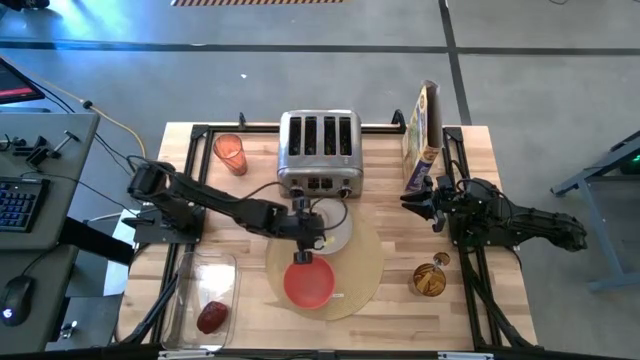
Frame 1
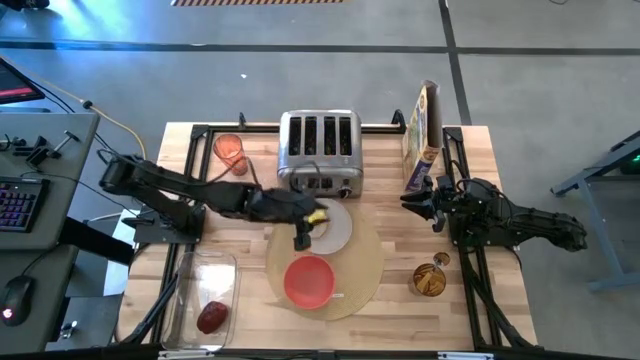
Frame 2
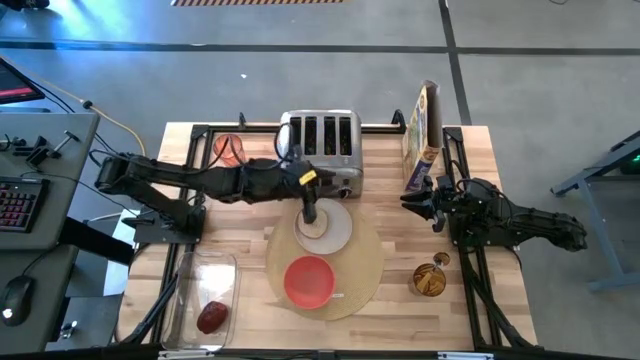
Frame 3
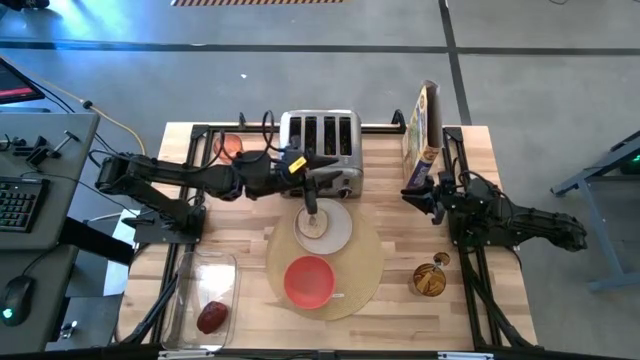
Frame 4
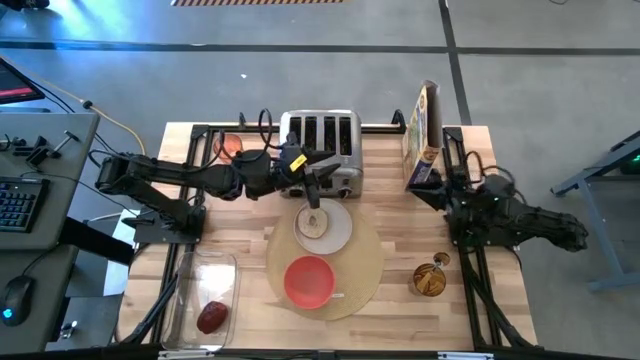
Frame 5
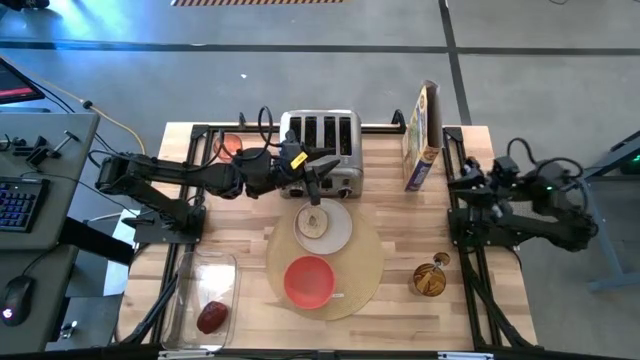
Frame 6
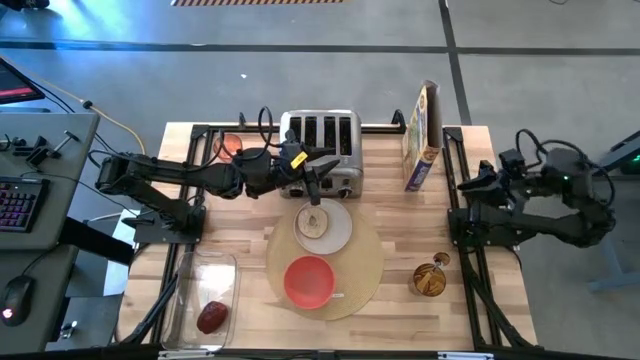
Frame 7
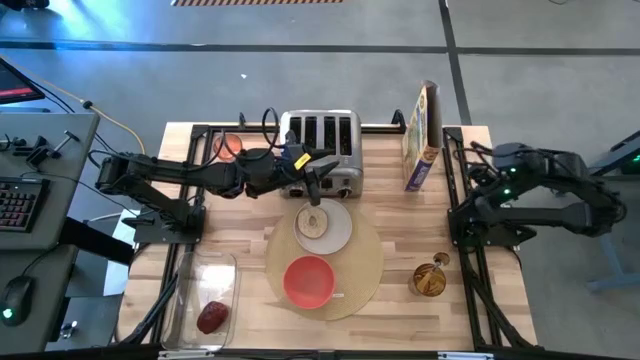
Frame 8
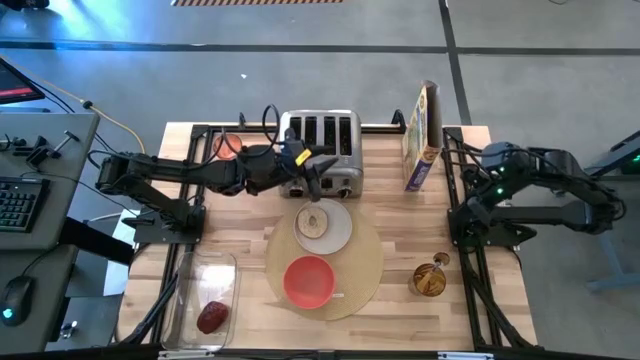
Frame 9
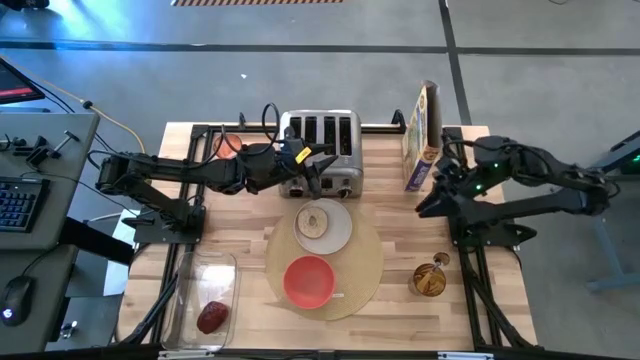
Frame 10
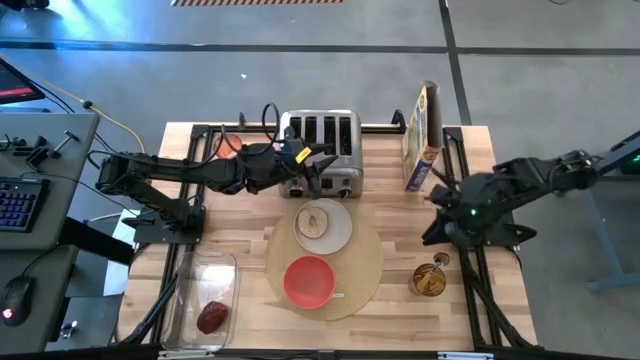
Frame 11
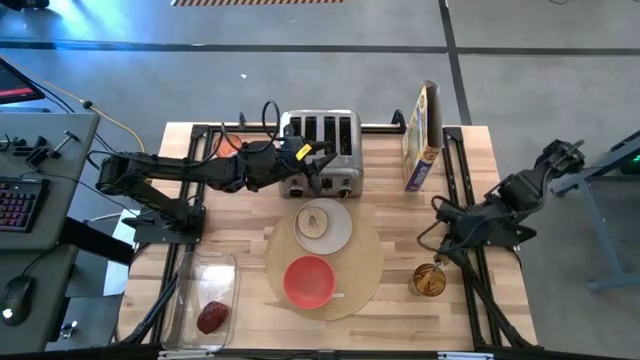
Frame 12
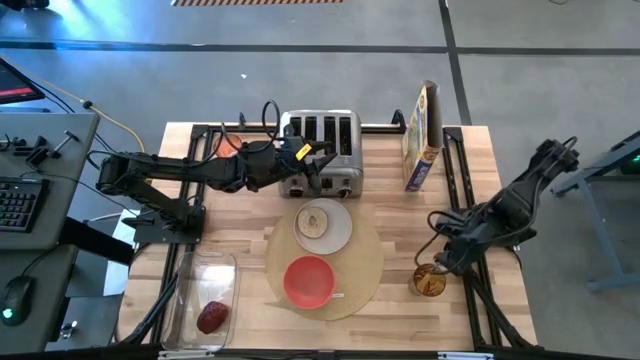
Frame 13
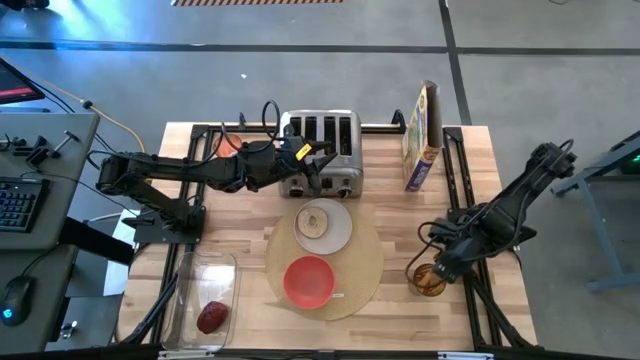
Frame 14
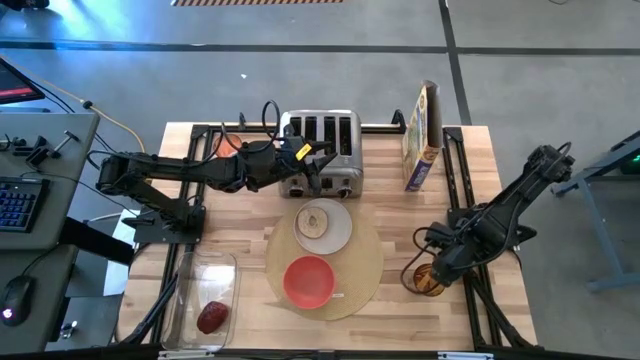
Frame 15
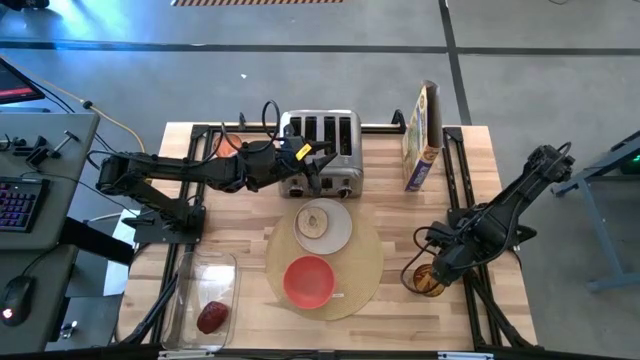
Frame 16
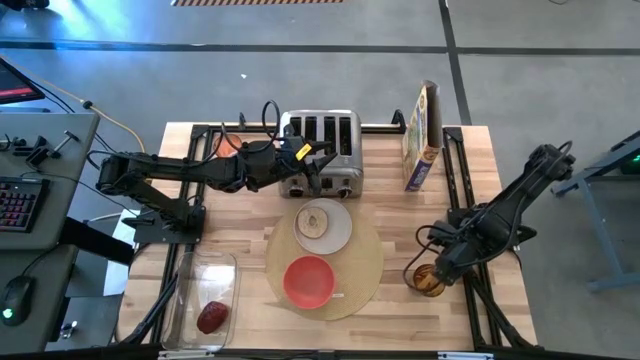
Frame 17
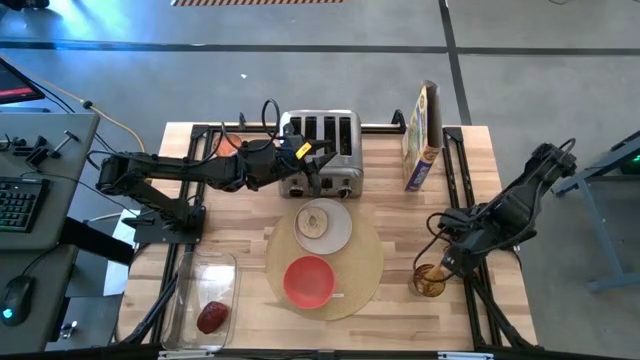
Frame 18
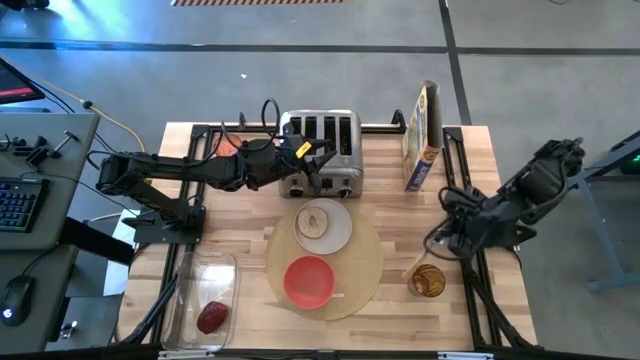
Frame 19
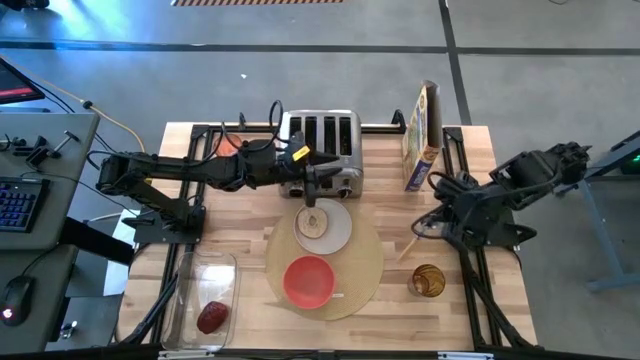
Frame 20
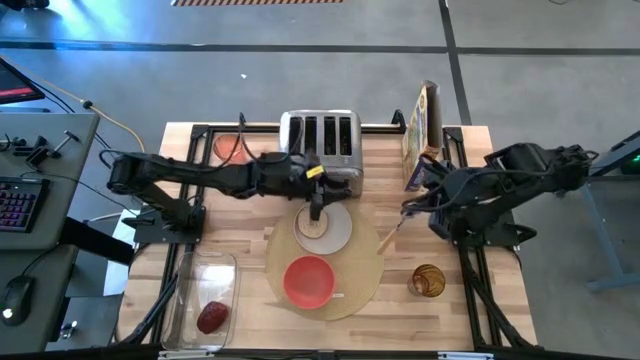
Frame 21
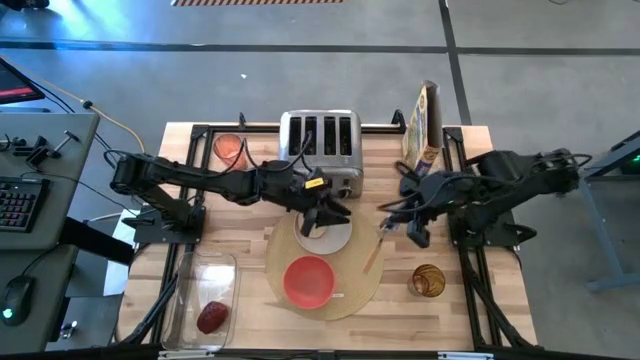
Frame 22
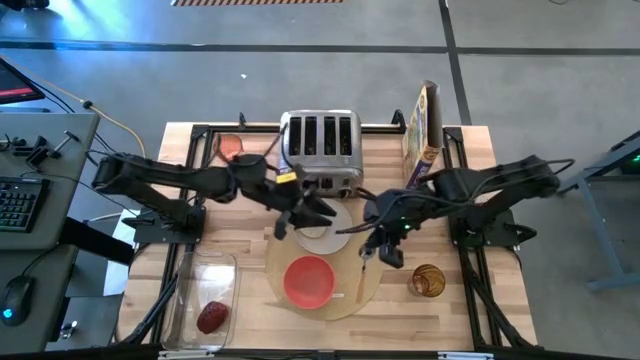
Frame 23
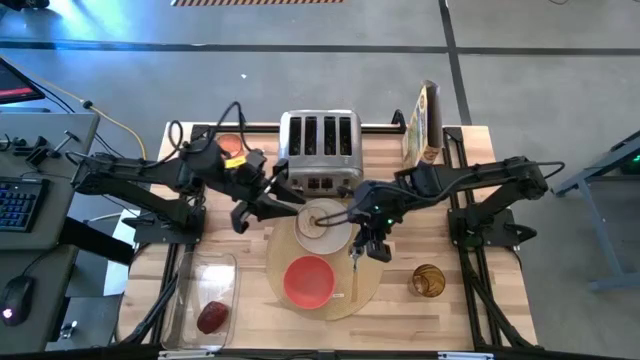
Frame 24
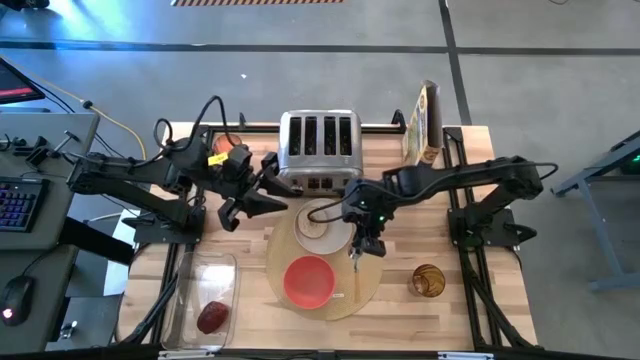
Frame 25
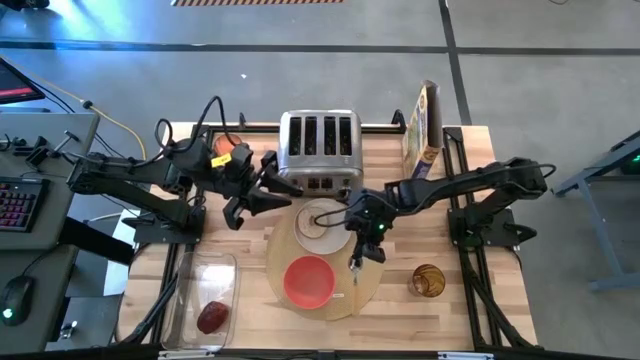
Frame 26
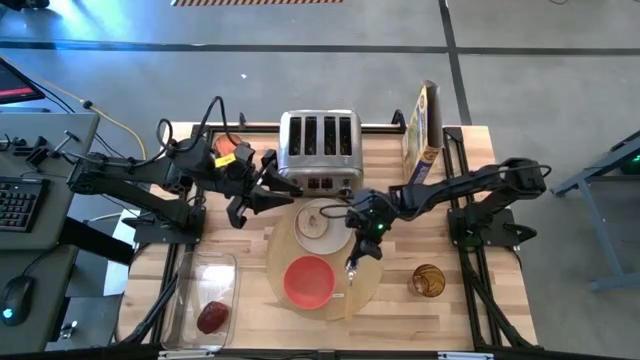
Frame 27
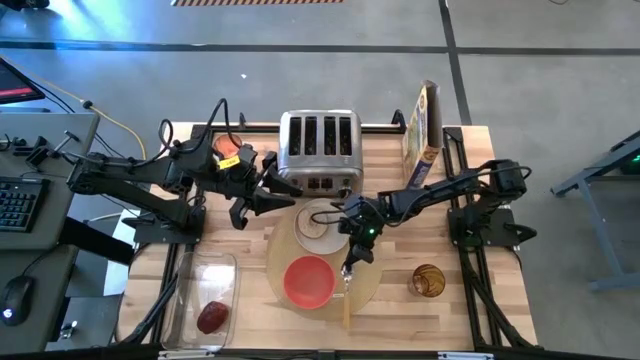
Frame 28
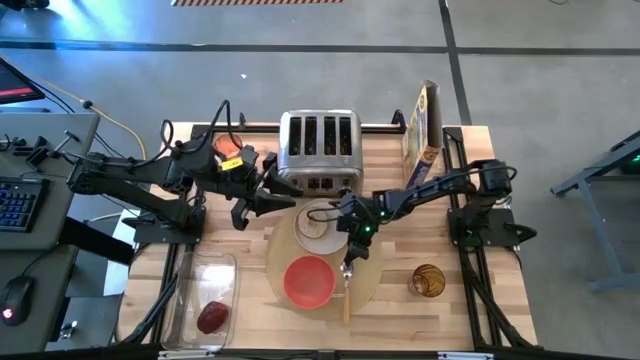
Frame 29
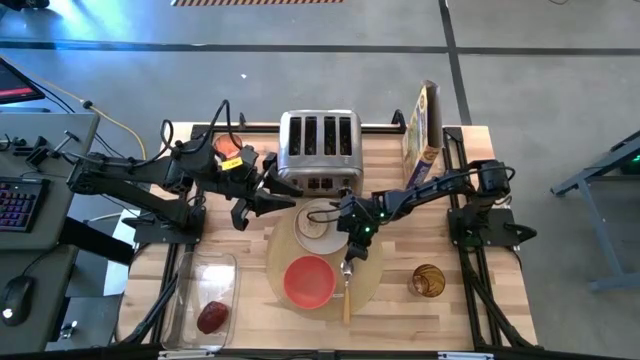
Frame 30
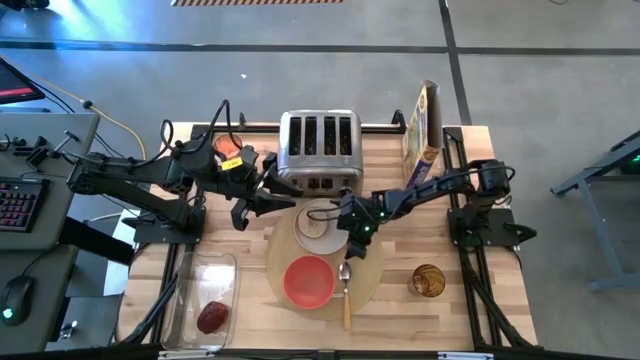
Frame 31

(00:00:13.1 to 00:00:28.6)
Task: Arrange a breakfast setting
Put the spoon on the placemat

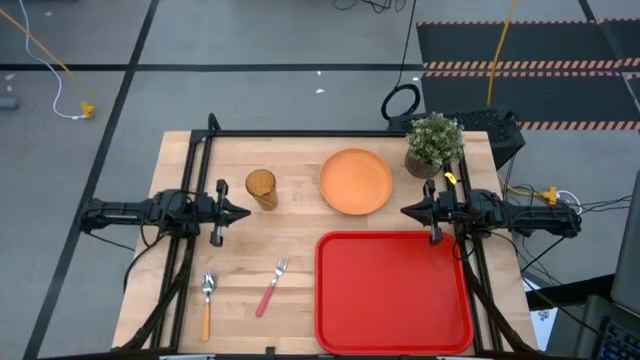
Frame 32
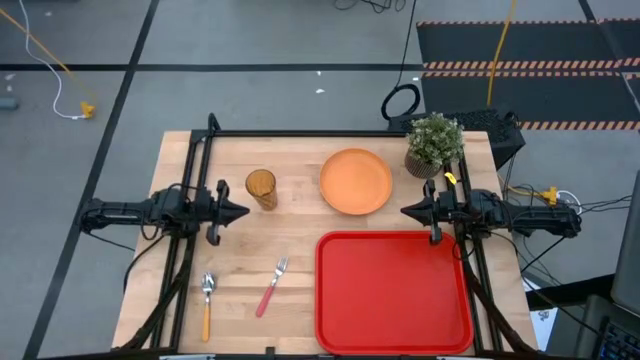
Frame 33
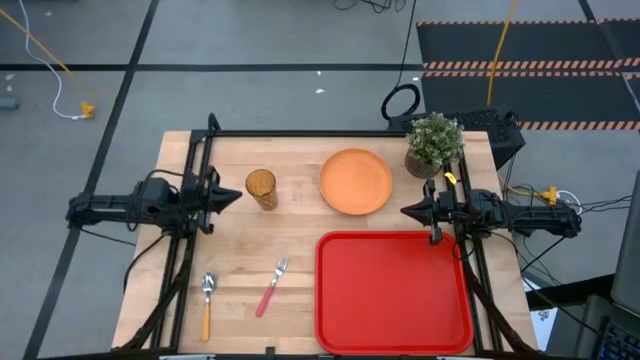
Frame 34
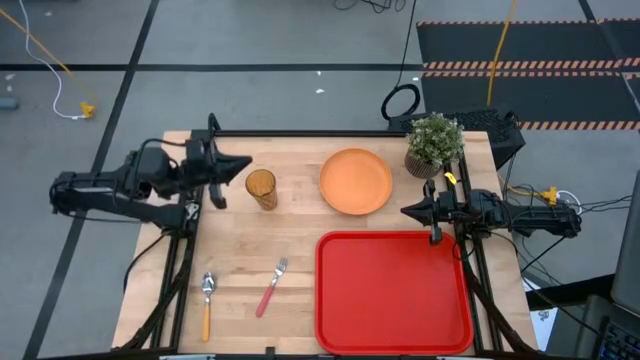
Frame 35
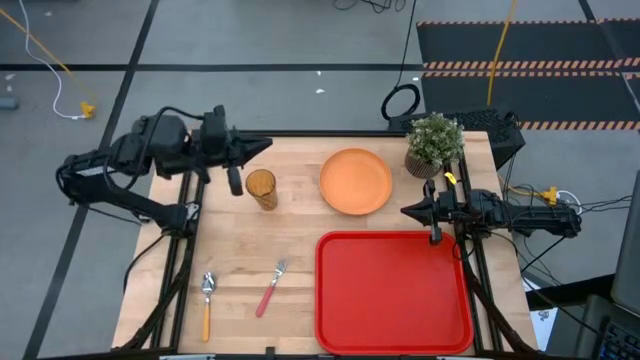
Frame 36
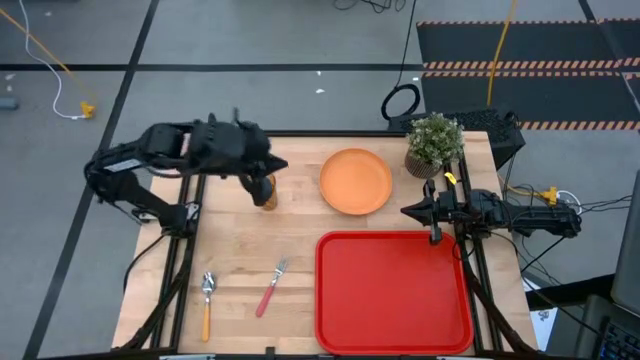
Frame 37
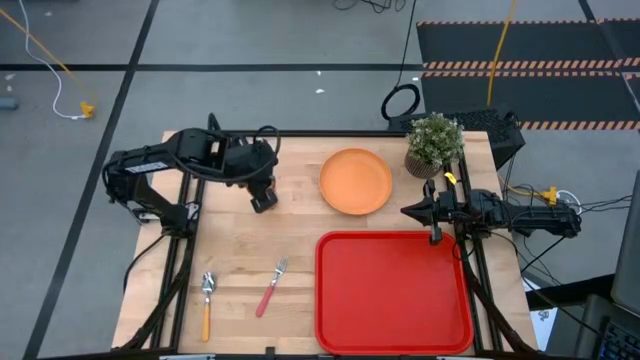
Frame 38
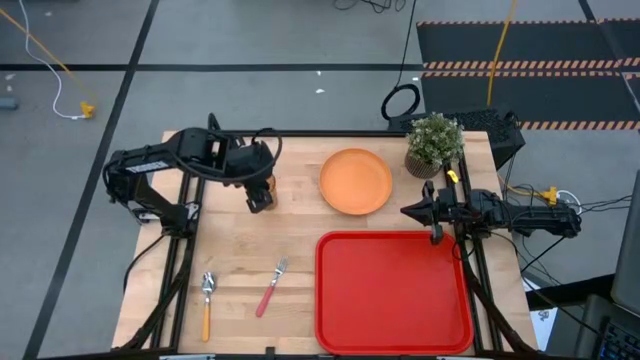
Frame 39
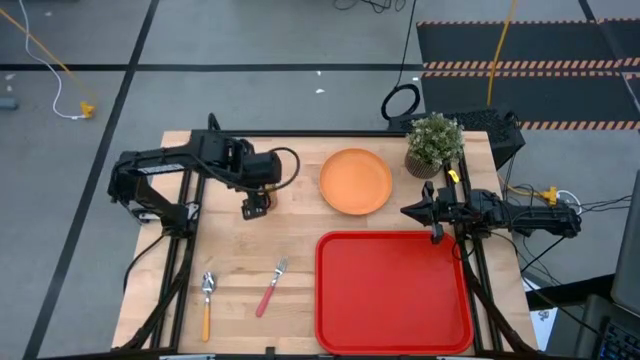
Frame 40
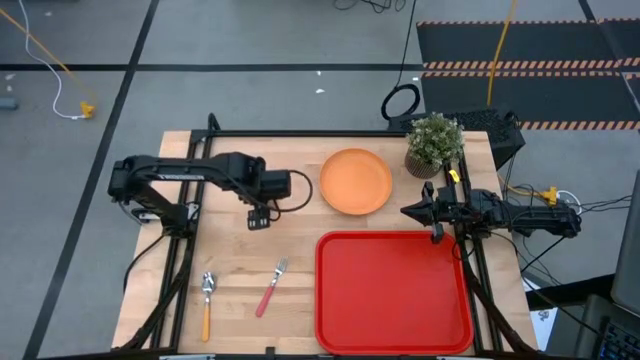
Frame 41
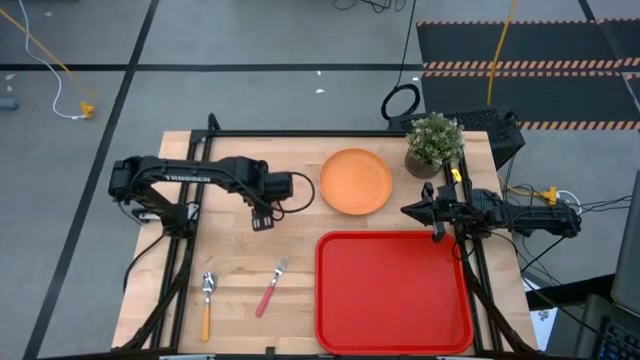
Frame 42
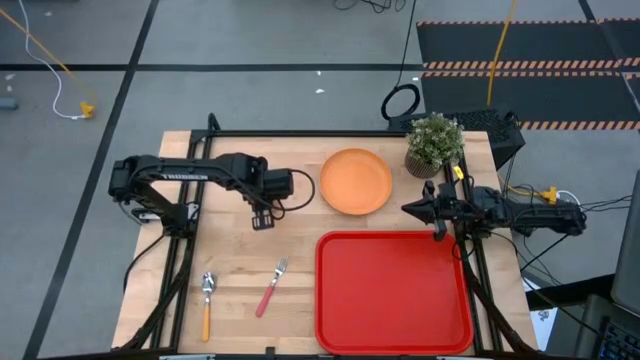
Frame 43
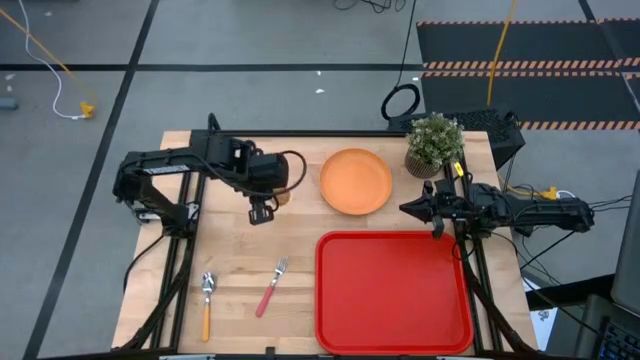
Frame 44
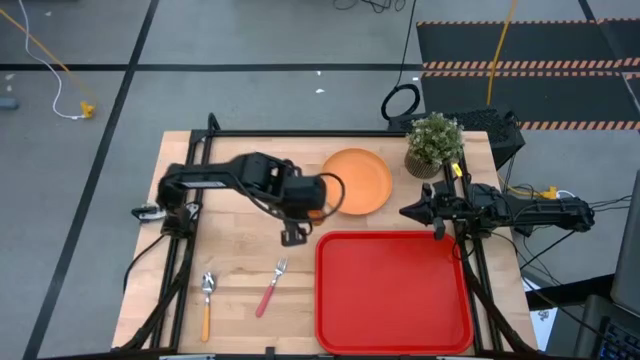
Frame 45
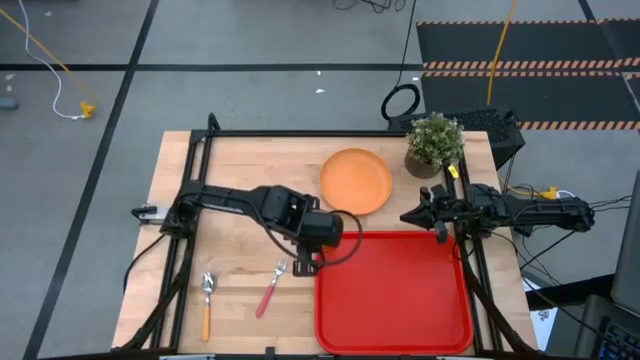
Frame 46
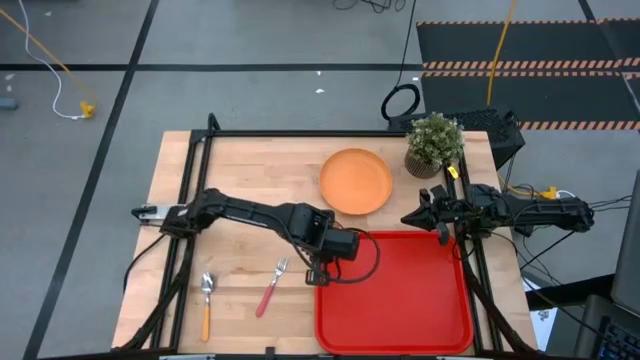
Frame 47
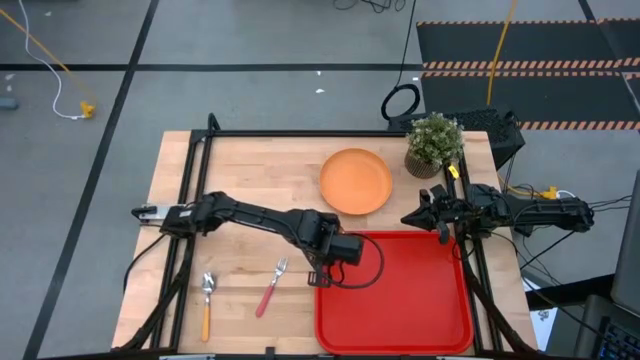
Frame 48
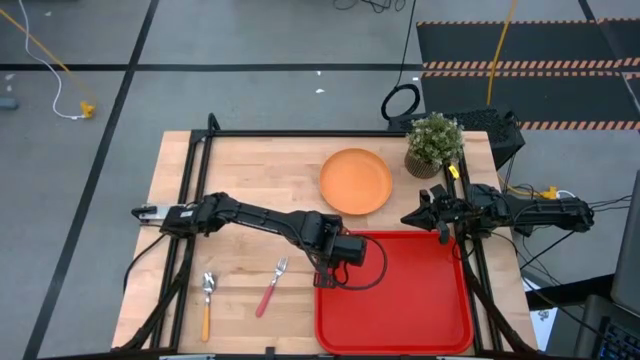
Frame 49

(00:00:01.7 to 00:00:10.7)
Task: Pick and place plate/cup/fork/spoon on tray
Put the orange cup to the top left on the red serving tray
